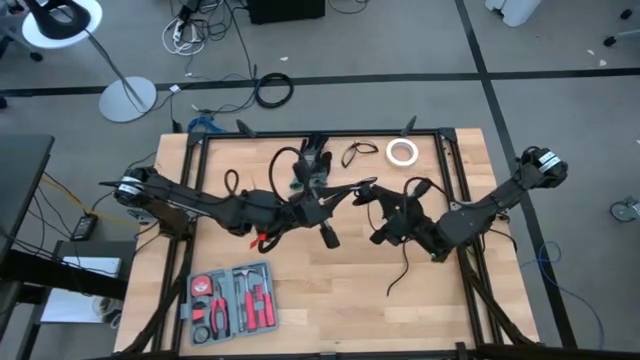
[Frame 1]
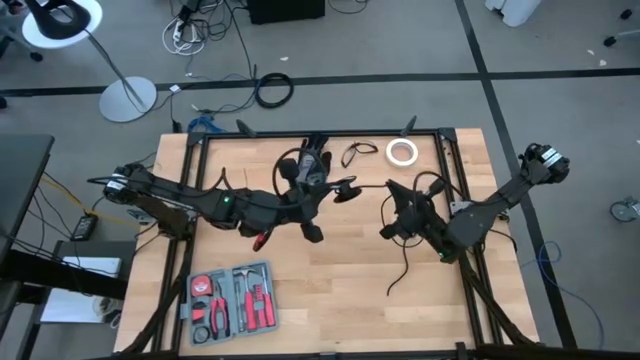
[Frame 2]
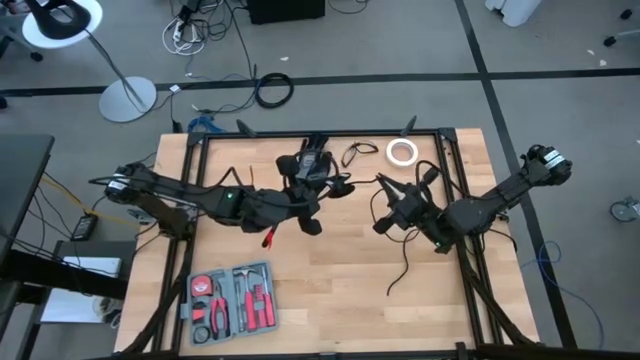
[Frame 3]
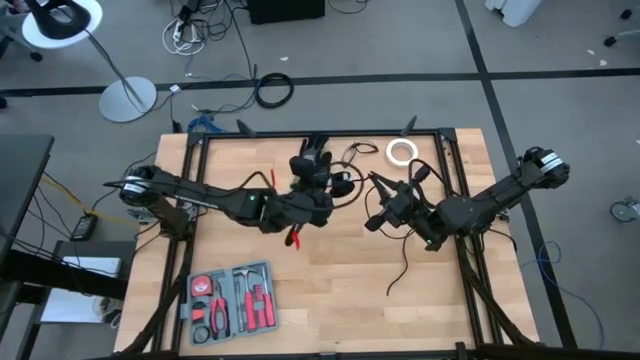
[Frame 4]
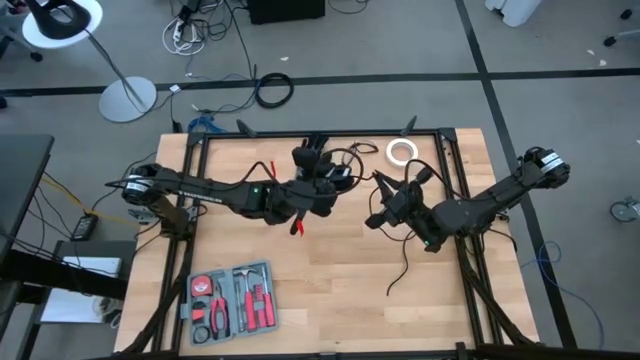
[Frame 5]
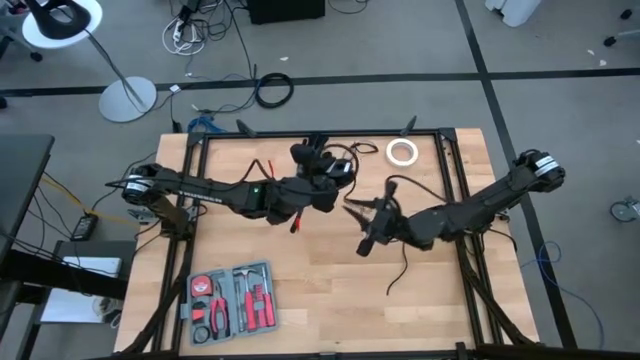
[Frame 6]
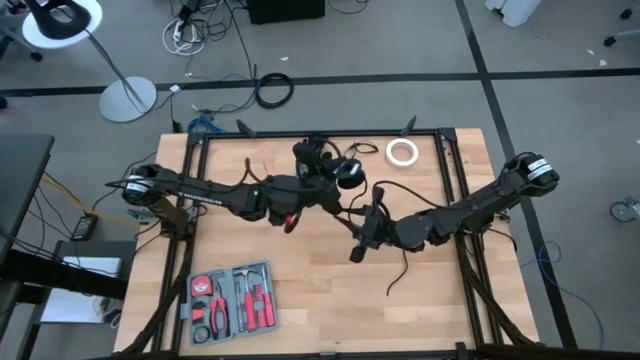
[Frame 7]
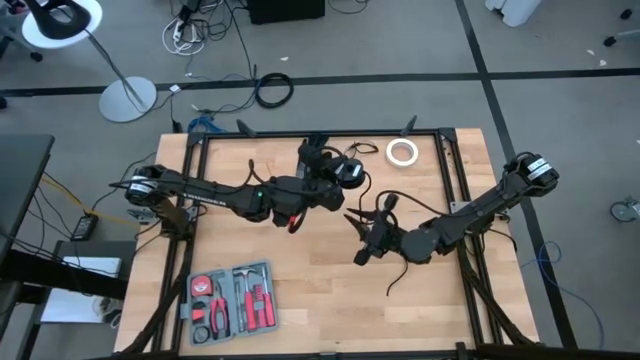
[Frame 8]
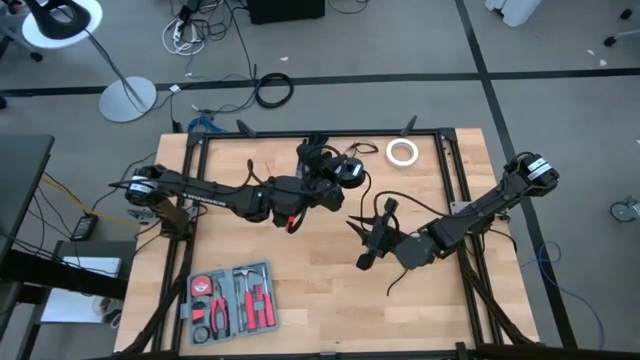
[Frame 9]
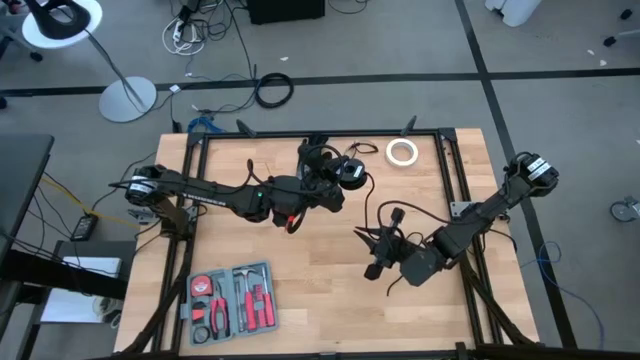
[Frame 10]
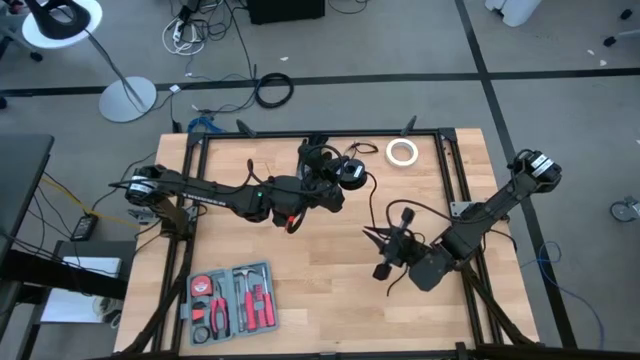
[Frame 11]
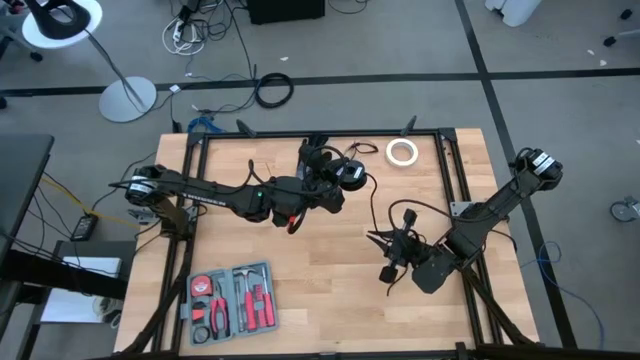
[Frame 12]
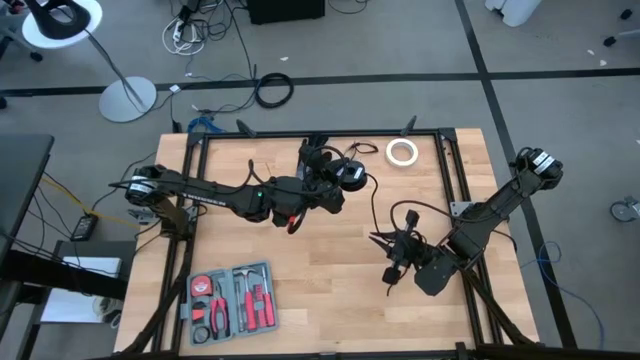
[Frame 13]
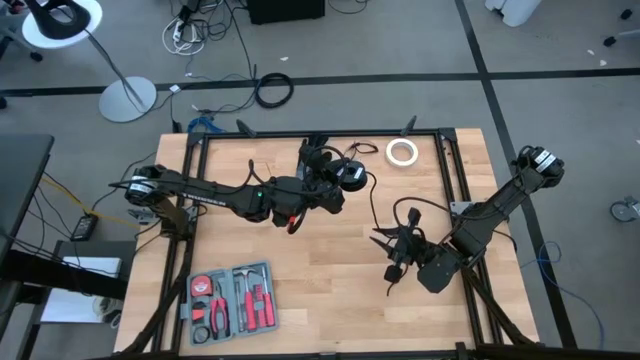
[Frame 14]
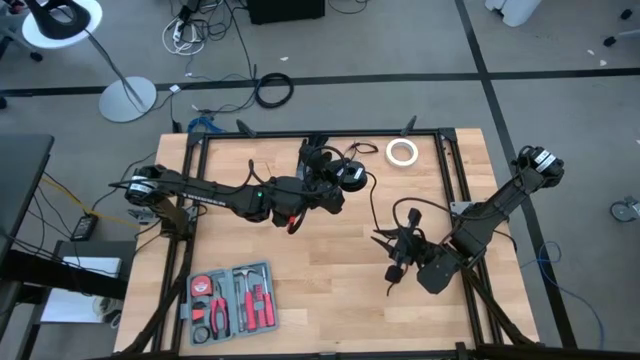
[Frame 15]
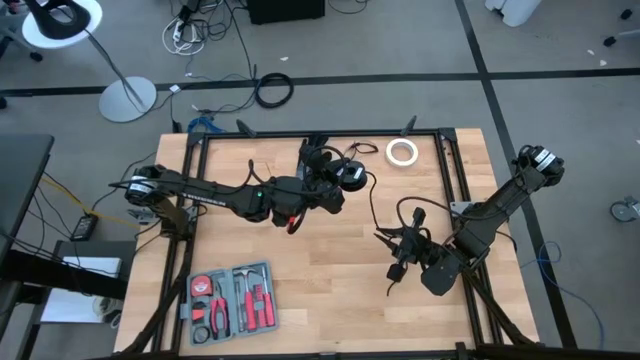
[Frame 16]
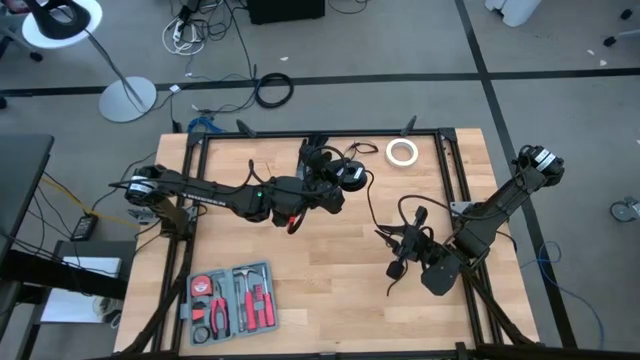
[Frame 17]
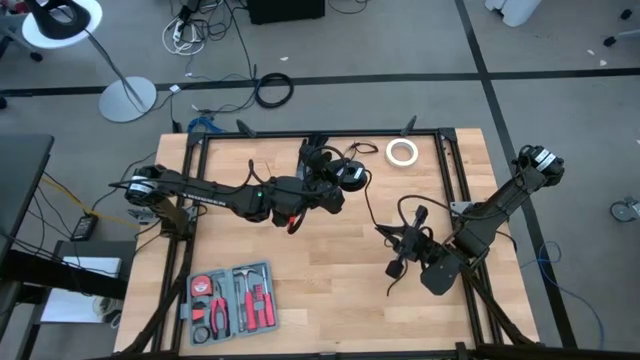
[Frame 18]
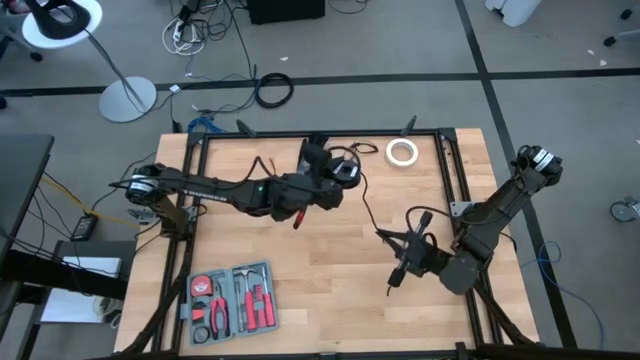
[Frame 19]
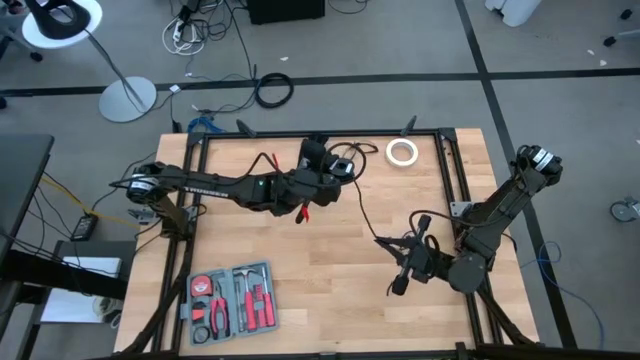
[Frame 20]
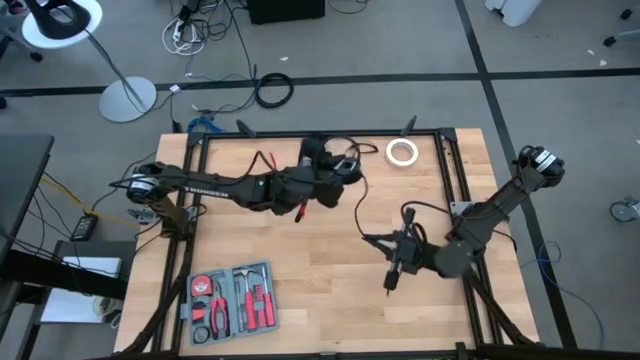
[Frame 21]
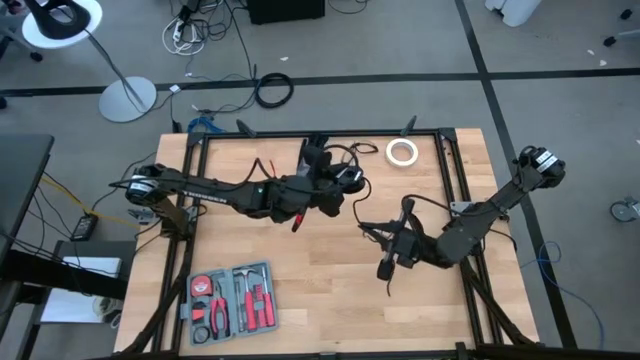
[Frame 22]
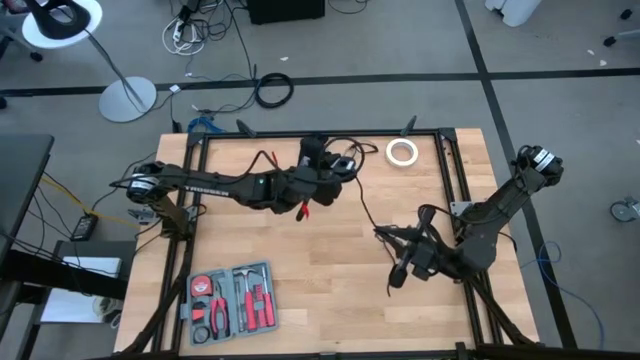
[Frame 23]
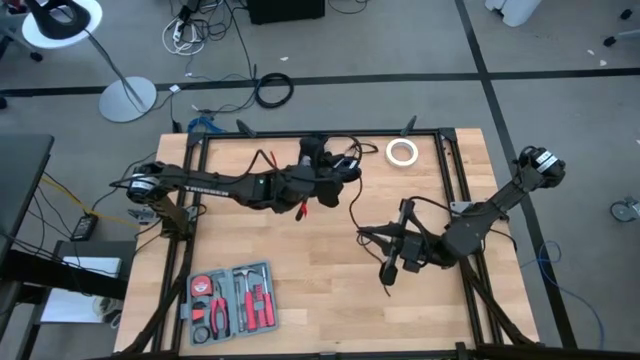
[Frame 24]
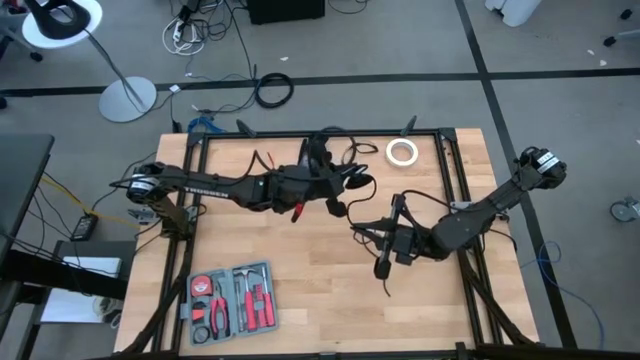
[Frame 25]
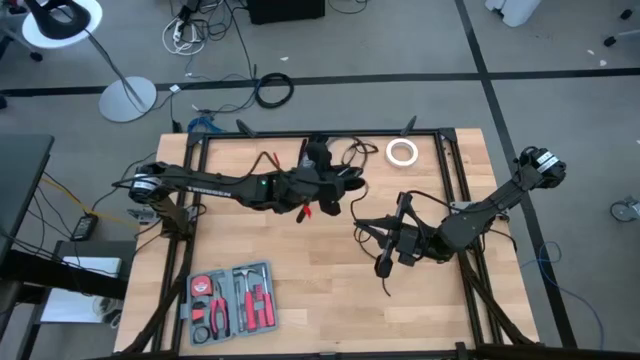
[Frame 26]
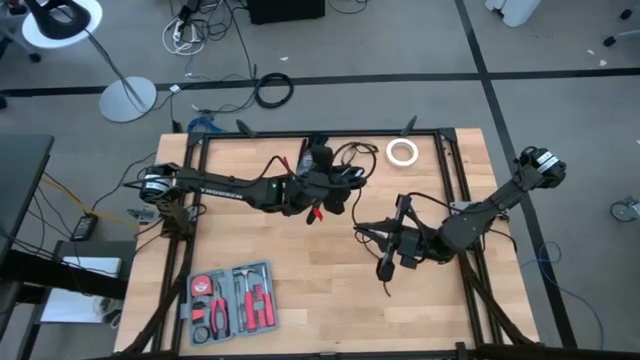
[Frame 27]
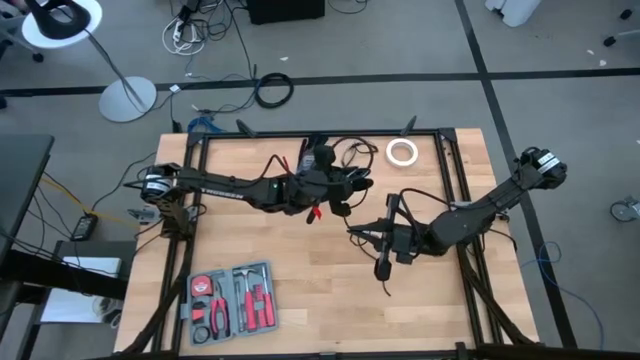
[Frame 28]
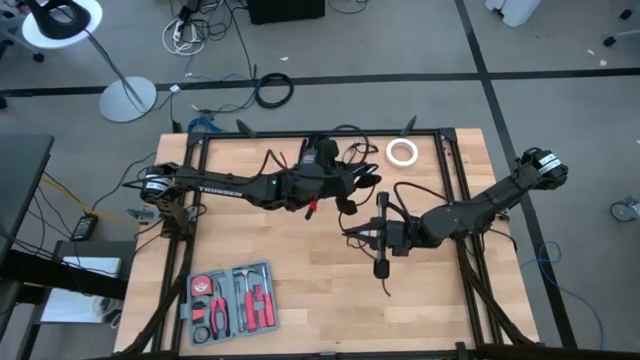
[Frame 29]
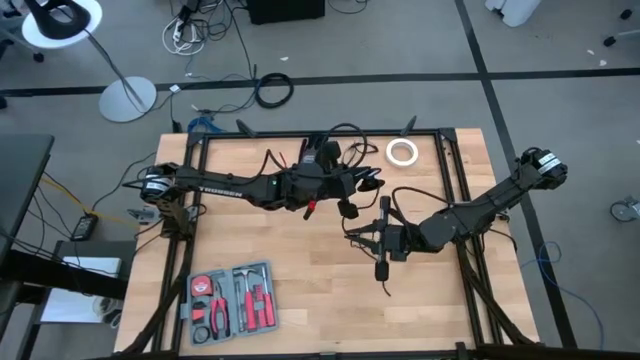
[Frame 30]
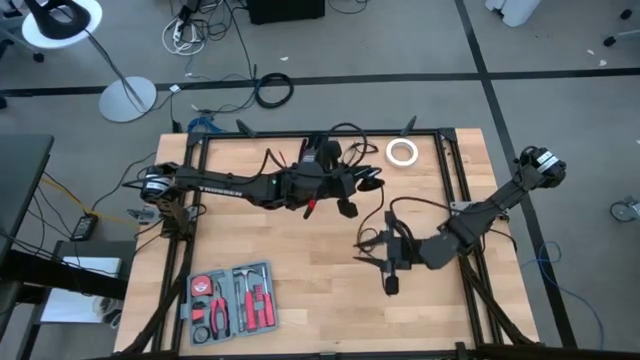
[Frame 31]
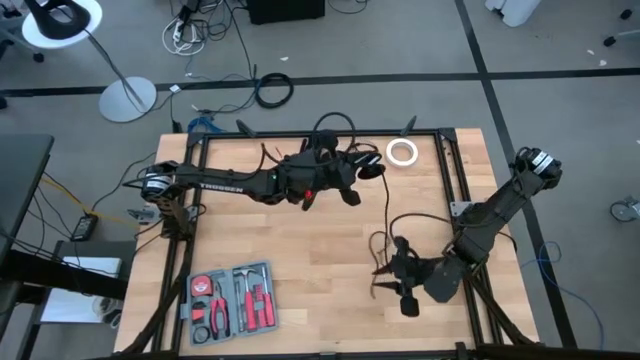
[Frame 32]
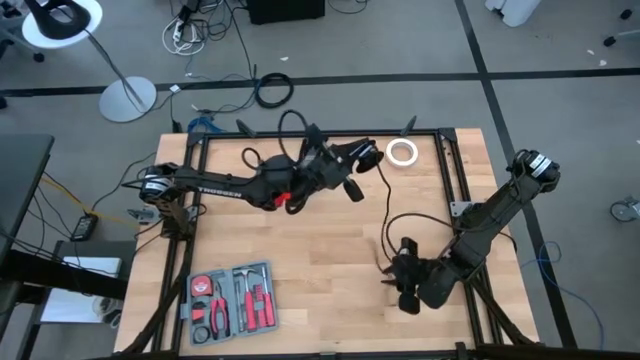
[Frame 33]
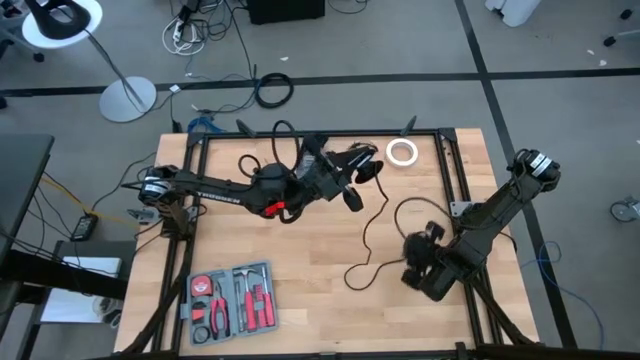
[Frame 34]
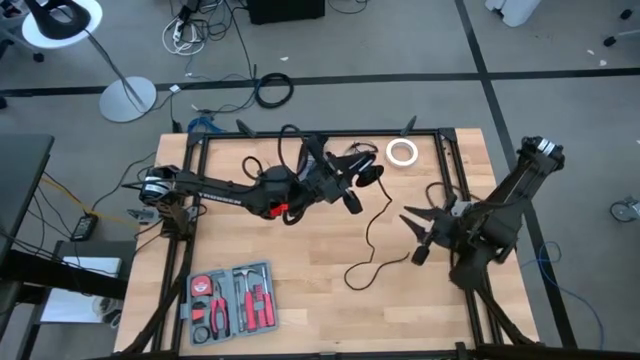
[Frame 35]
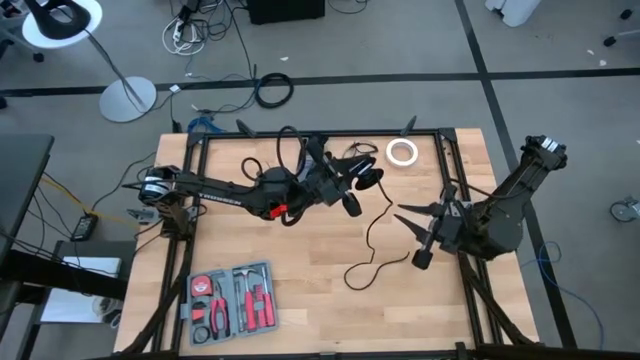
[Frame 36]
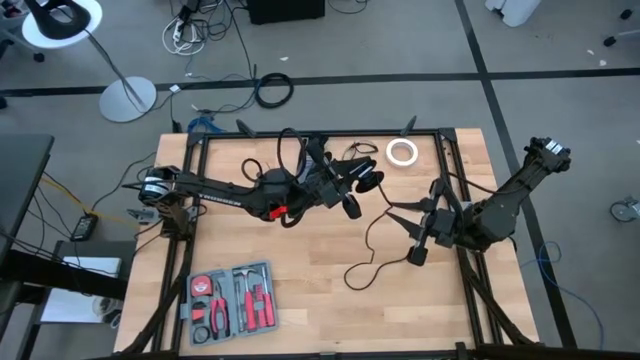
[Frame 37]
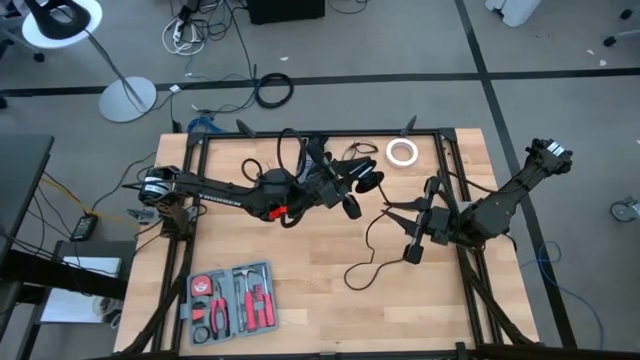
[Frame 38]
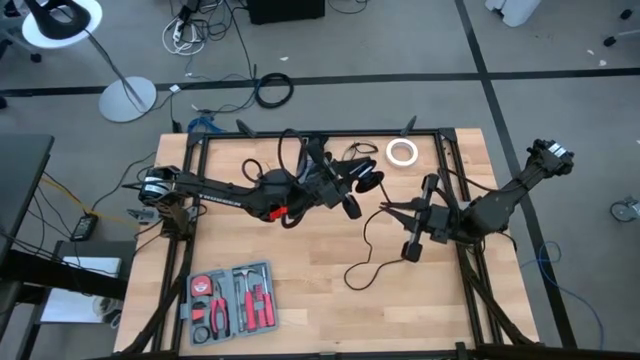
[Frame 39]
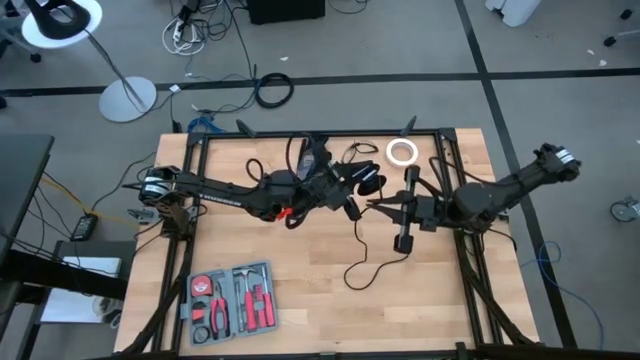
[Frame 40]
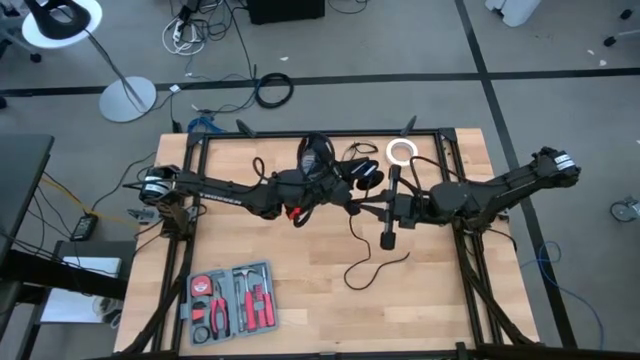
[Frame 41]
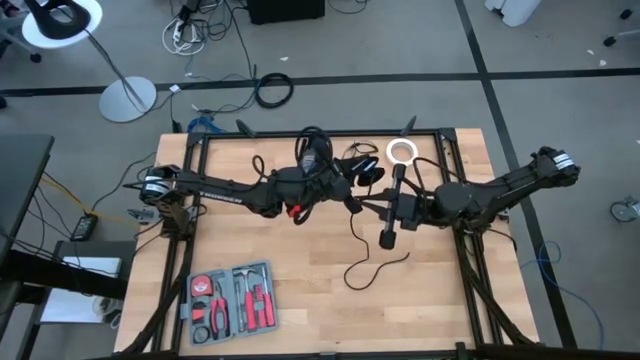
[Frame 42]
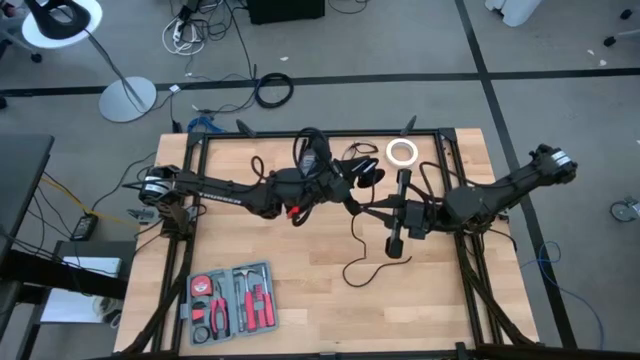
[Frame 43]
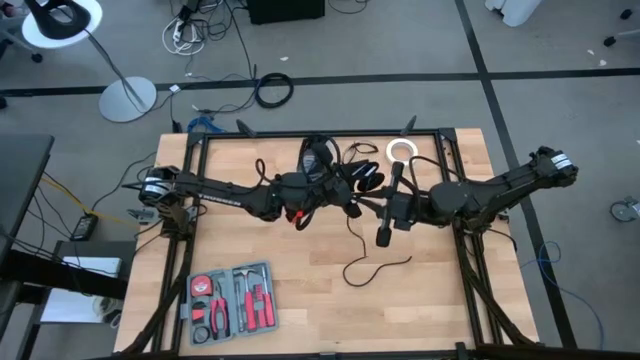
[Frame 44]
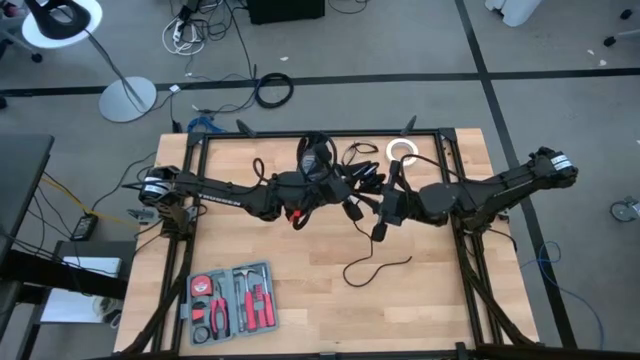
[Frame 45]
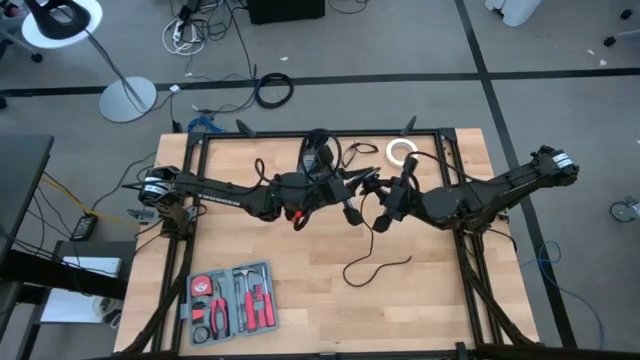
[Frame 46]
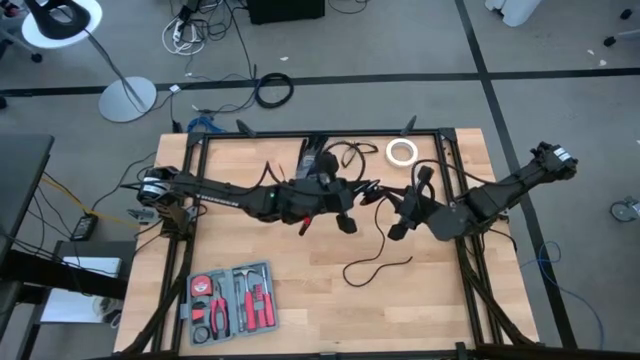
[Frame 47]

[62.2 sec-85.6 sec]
Task: Coil cords
Coil the black wire into a spool
